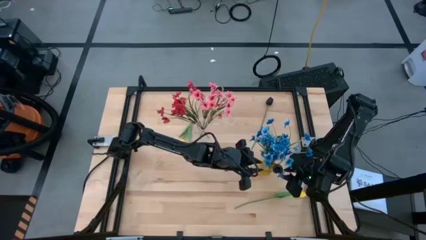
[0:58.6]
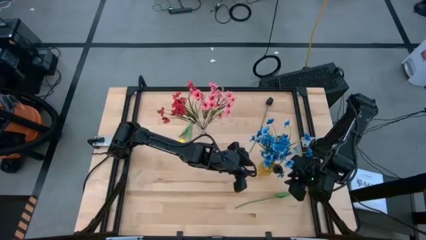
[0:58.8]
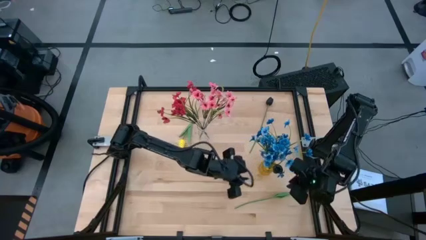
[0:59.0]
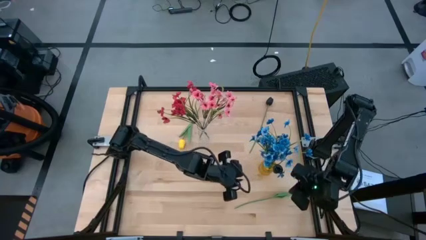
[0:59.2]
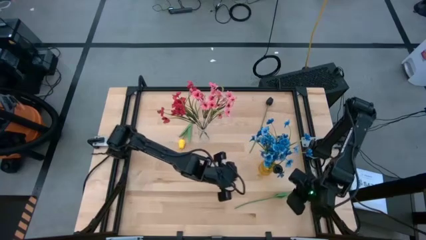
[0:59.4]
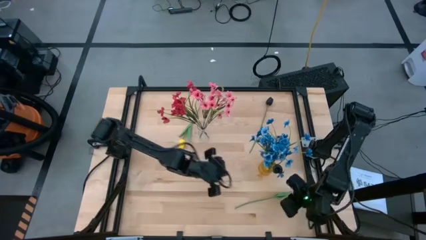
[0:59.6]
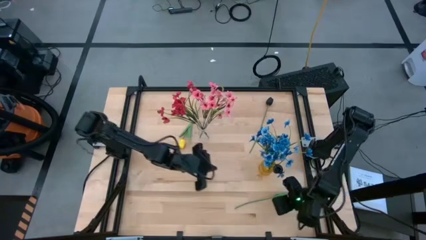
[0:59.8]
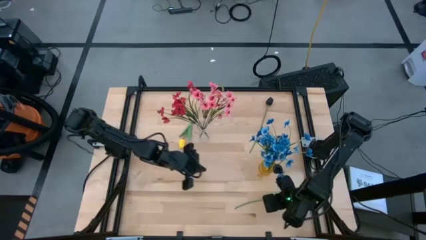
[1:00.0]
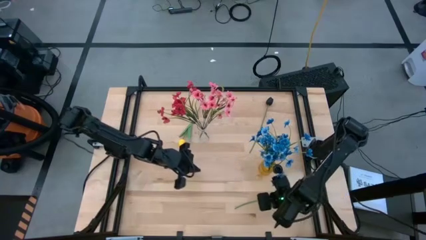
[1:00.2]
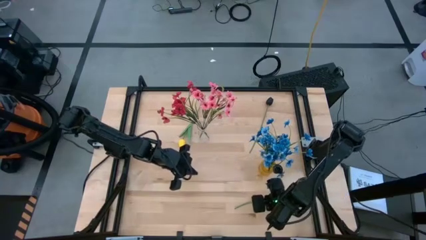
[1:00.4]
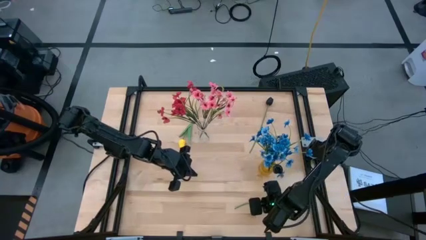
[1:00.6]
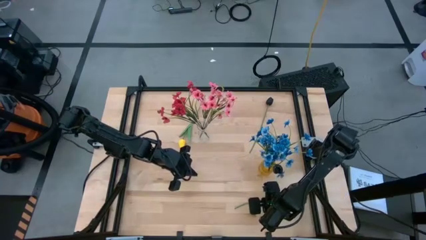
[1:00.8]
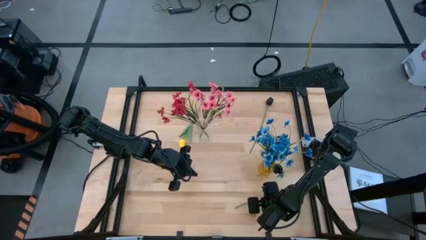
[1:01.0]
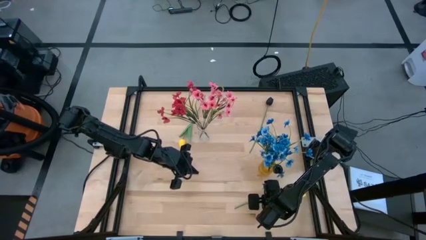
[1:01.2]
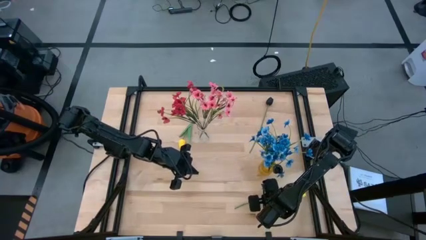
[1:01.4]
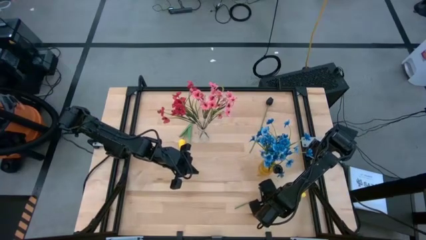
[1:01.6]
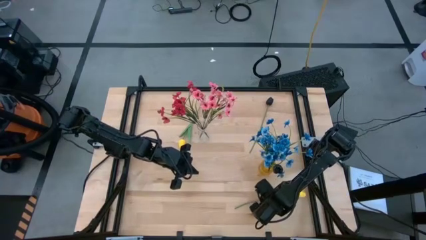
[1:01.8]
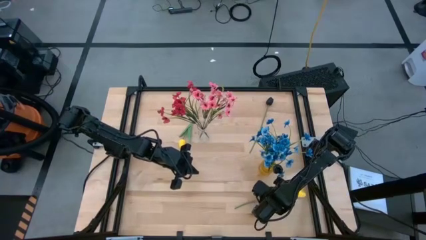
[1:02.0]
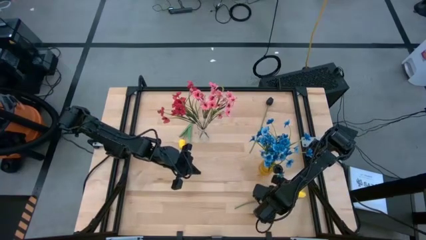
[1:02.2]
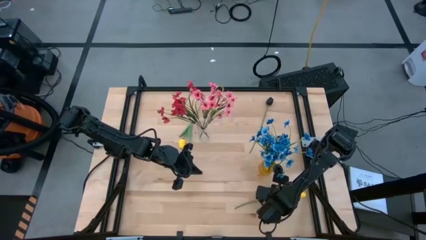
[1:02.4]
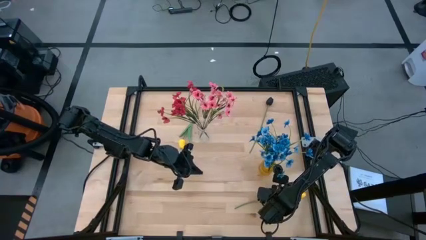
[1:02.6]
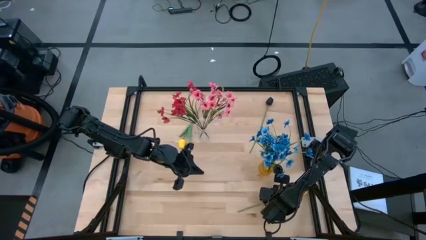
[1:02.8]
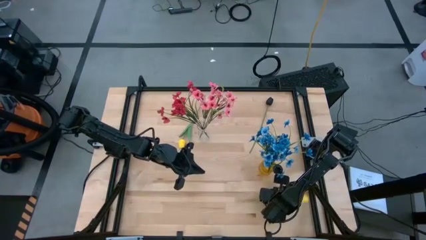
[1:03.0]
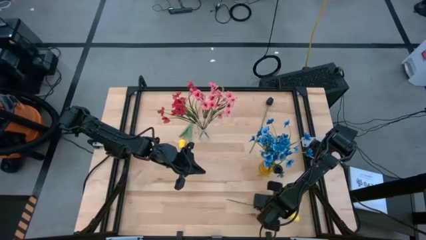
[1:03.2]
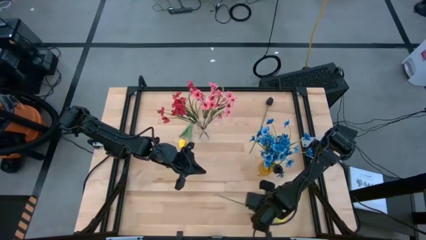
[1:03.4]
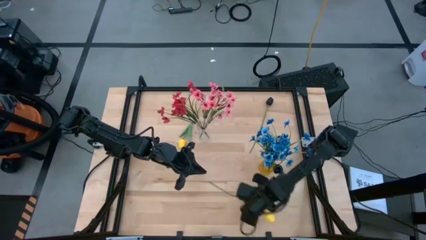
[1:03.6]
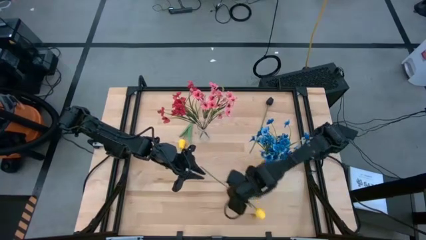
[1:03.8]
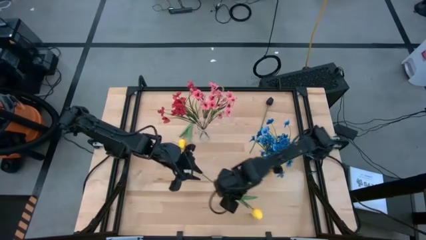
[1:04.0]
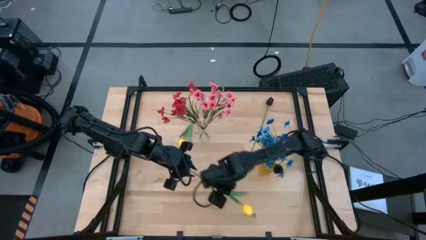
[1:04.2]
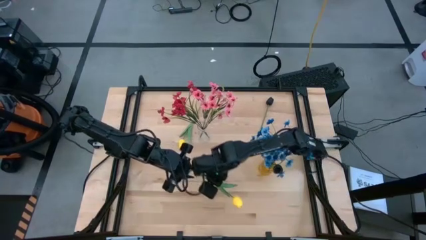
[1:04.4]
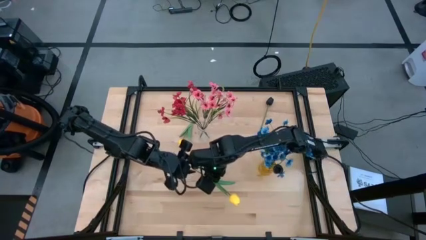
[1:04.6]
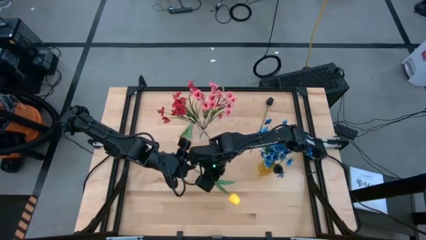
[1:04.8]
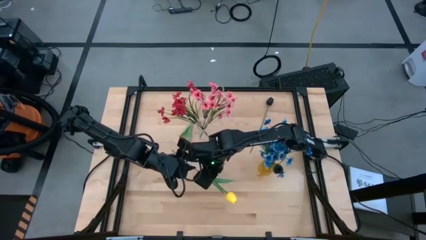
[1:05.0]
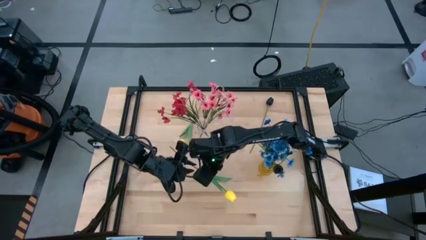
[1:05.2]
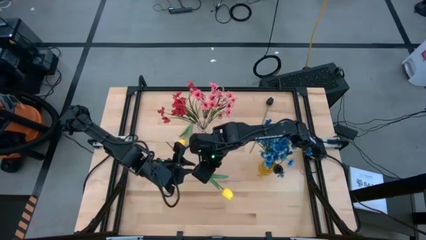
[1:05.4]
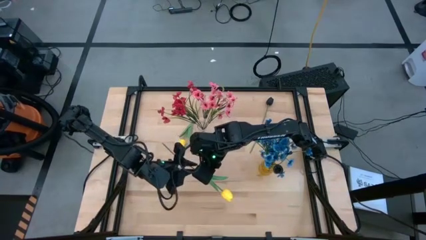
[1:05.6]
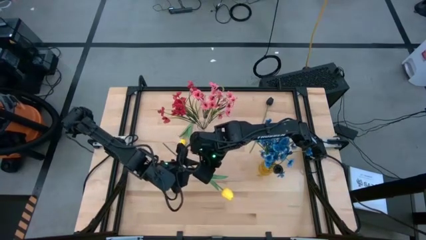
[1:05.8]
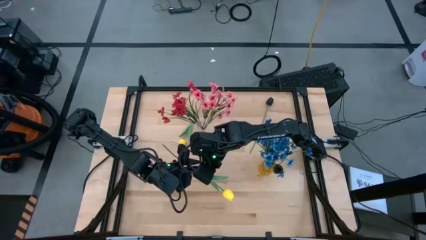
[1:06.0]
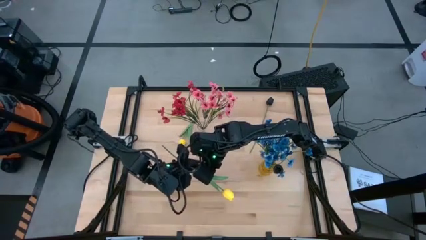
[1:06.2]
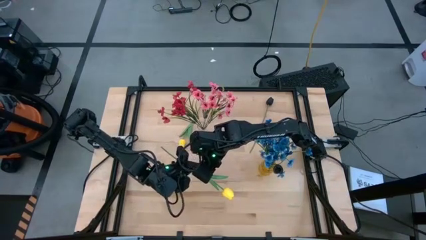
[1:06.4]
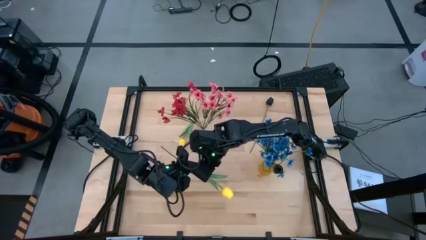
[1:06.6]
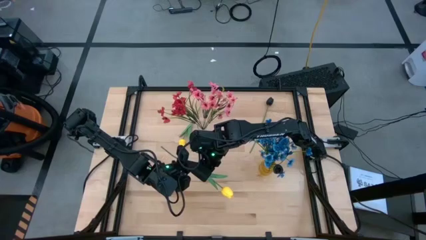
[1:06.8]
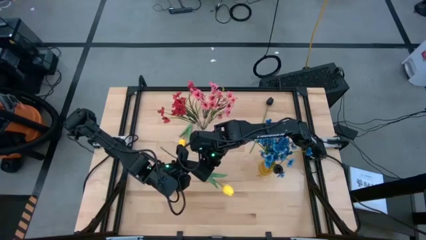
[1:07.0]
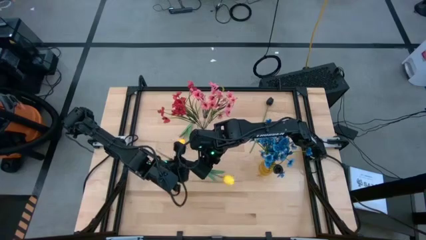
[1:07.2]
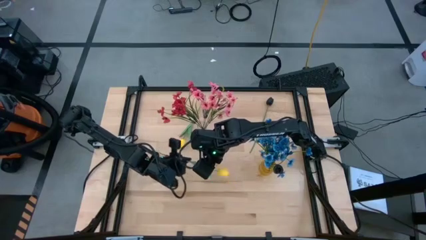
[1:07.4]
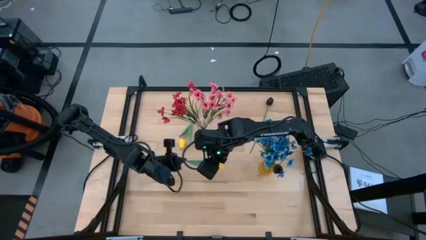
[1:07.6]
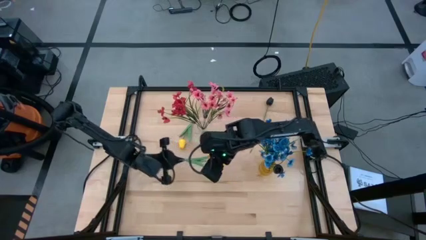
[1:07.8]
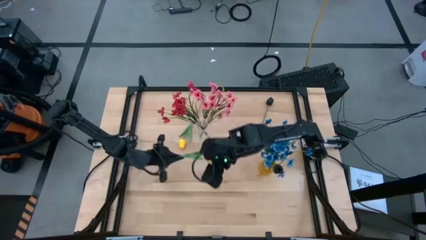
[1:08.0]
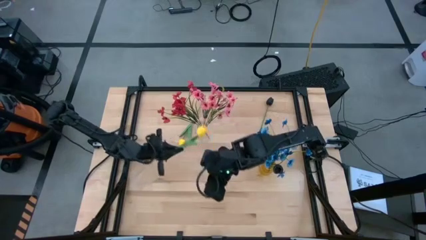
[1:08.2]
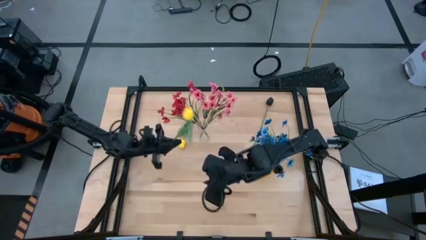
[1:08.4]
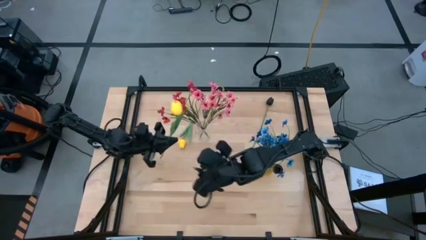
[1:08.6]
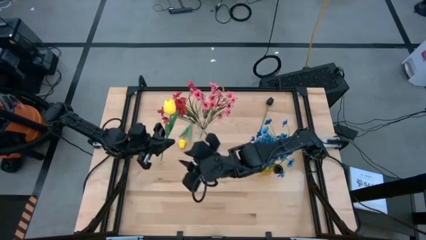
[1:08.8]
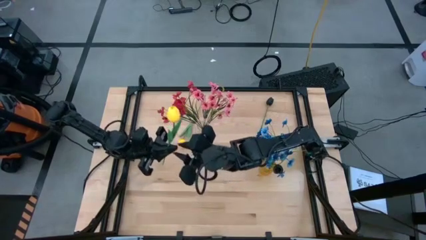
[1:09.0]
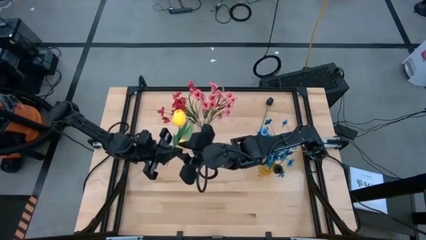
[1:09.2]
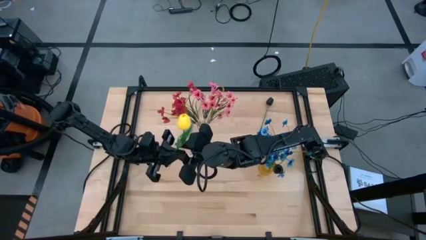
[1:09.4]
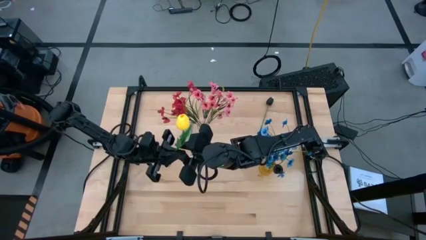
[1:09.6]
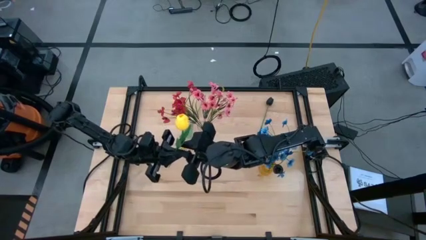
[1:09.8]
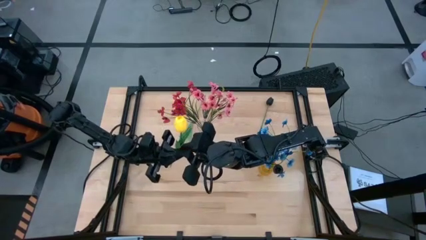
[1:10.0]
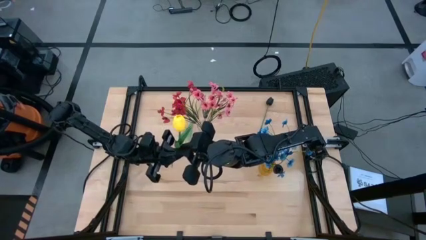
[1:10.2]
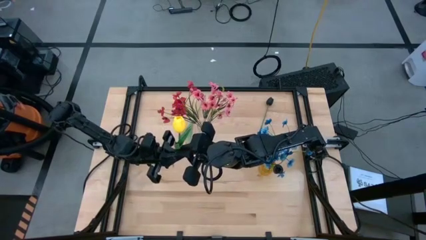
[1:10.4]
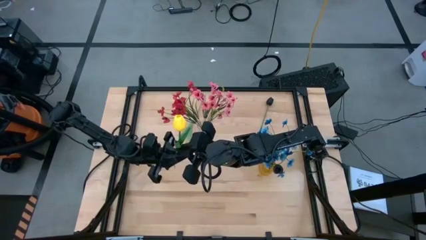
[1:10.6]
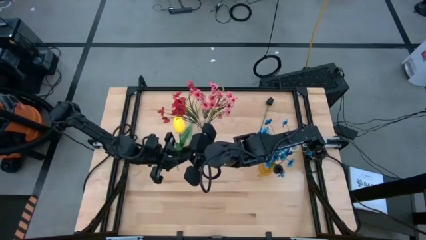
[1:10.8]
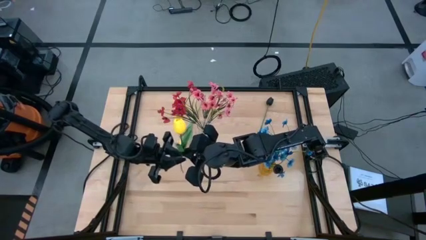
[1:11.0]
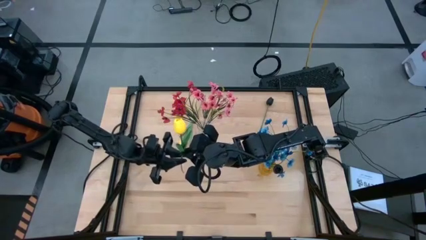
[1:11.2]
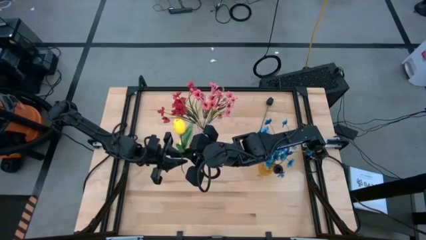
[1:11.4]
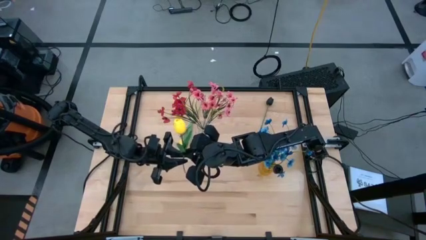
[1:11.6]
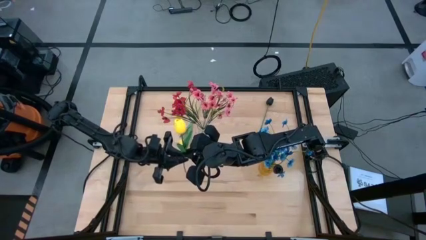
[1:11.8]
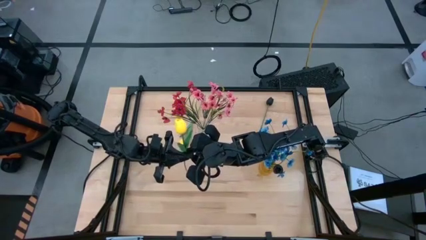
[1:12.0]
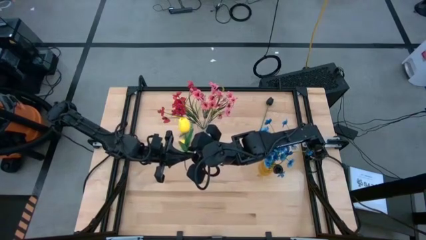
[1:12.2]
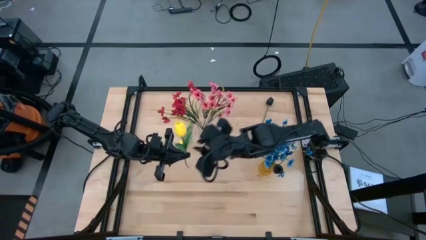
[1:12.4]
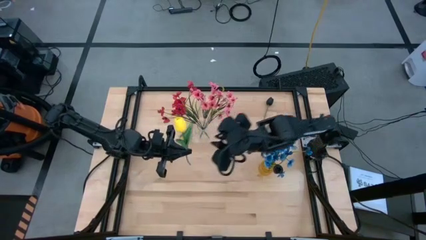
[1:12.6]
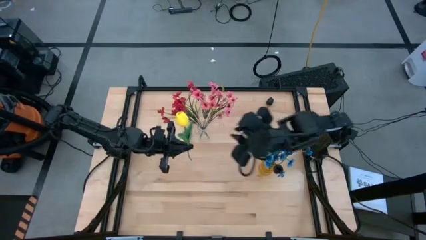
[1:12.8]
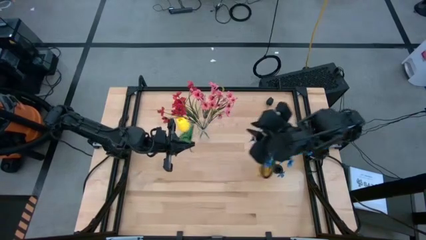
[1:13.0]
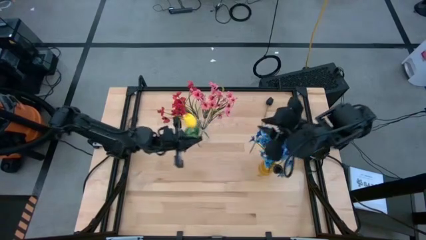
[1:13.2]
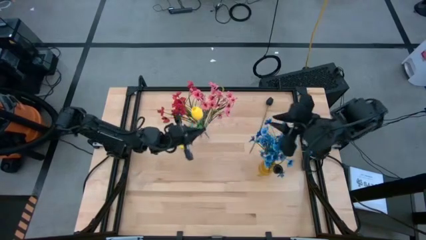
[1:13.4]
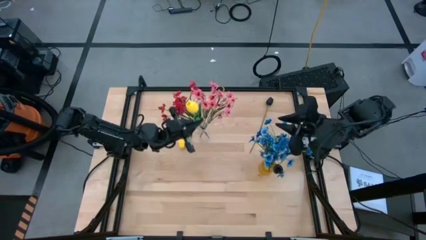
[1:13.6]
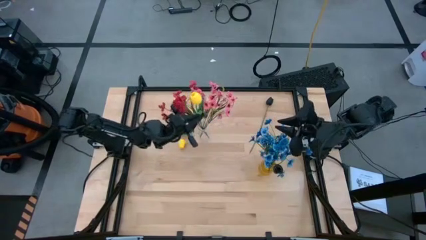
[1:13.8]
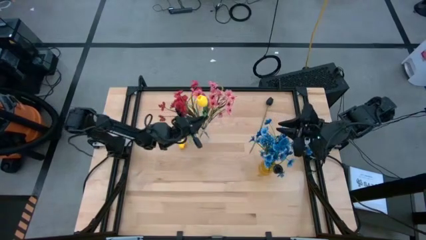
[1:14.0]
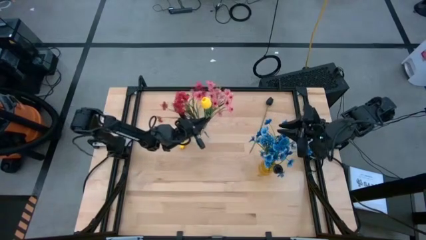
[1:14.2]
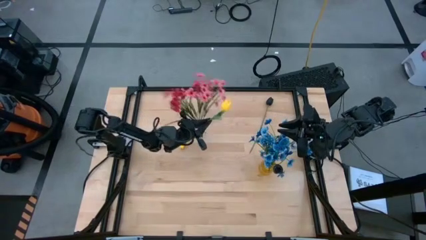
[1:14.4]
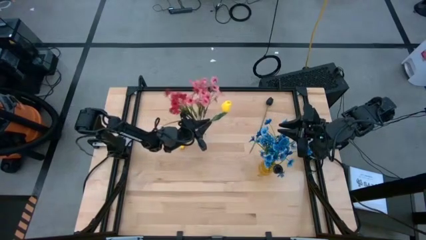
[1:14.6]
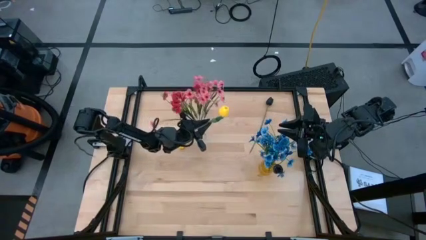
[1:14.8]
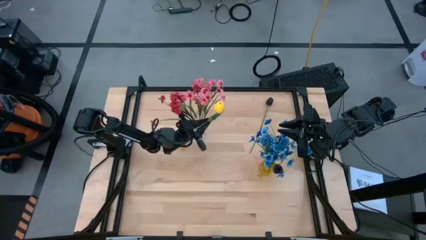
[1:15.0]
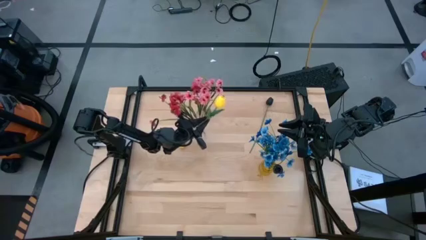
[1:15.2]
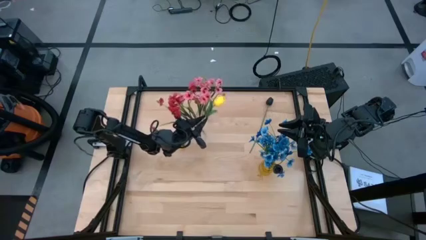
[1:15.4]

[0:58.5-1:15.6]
Task: Sort flowers into vase by color
Put the bottom yellow flower into the transparent vase
